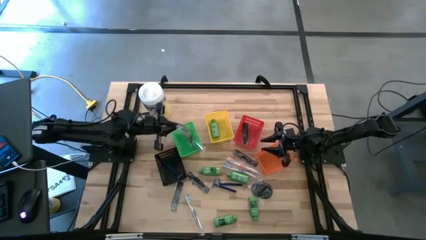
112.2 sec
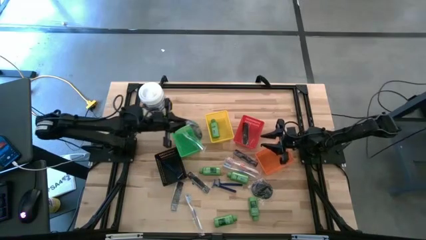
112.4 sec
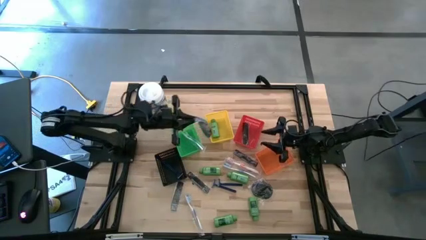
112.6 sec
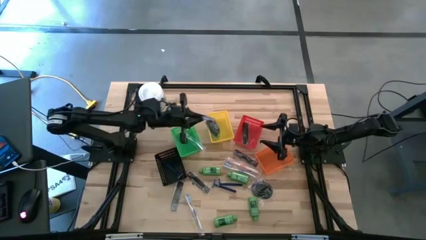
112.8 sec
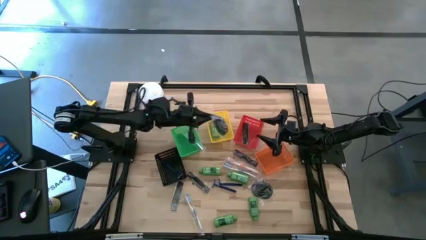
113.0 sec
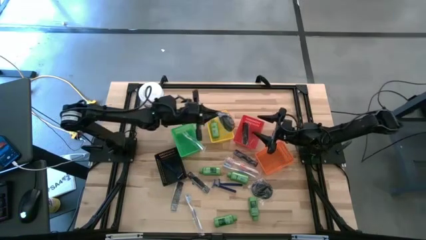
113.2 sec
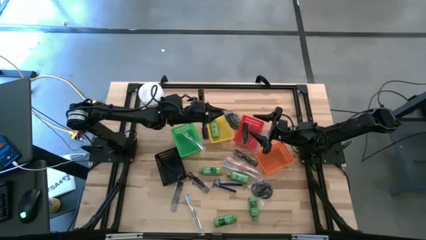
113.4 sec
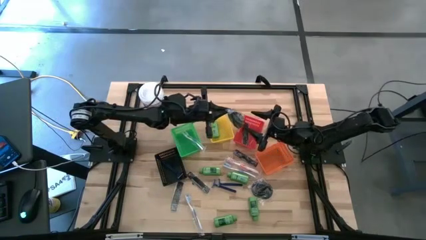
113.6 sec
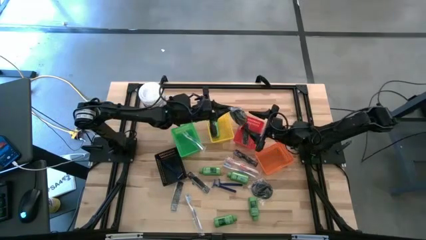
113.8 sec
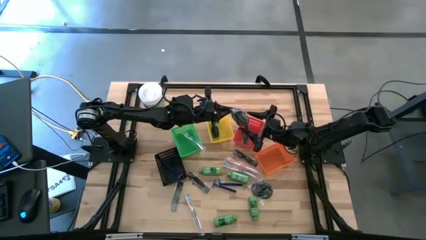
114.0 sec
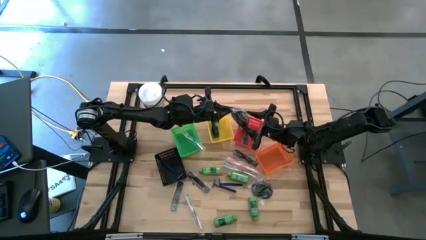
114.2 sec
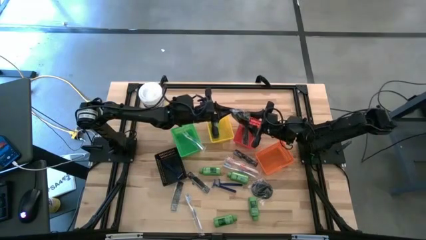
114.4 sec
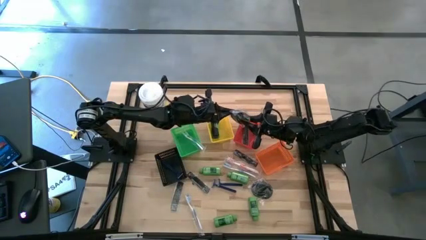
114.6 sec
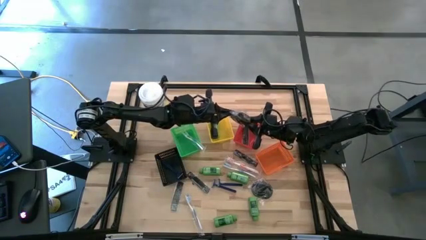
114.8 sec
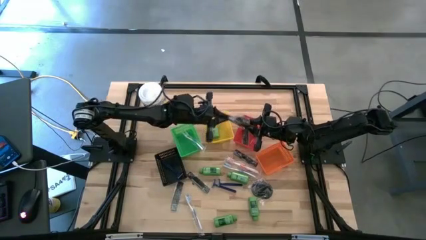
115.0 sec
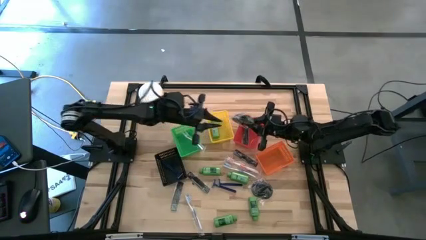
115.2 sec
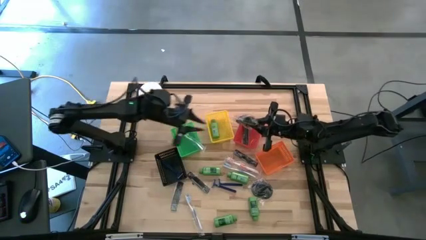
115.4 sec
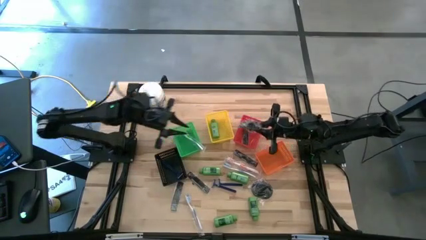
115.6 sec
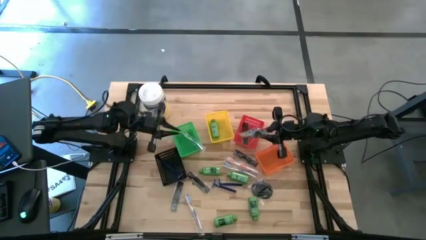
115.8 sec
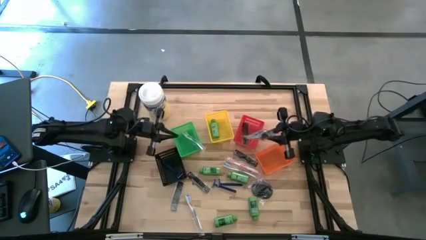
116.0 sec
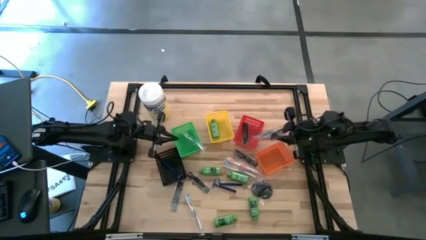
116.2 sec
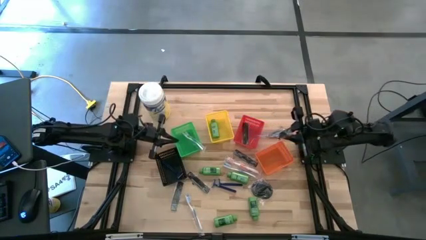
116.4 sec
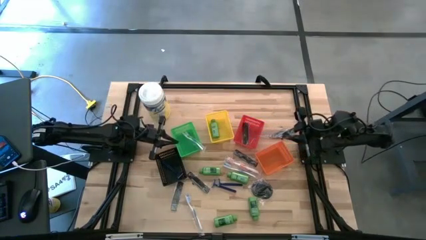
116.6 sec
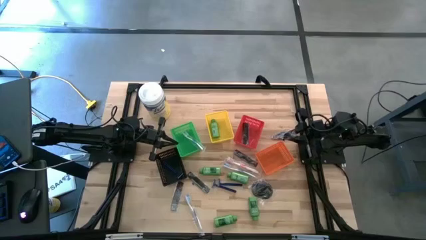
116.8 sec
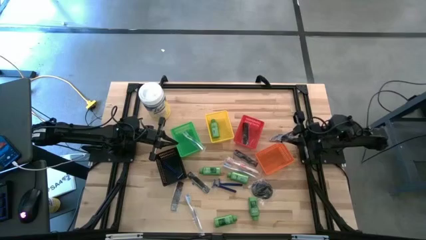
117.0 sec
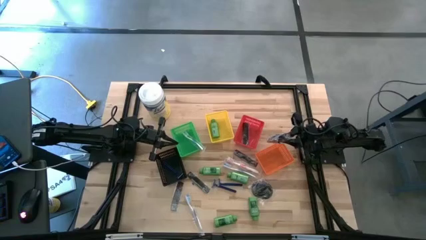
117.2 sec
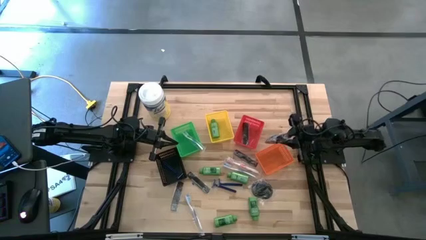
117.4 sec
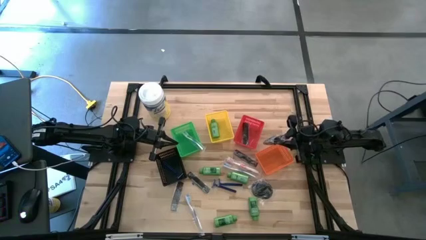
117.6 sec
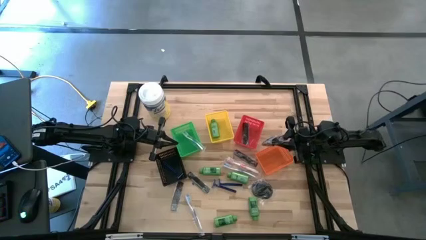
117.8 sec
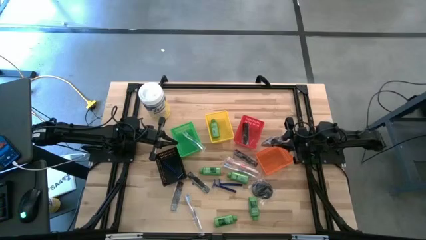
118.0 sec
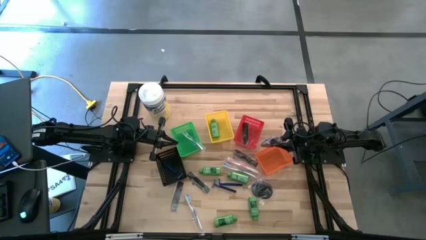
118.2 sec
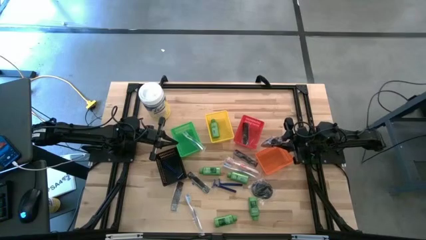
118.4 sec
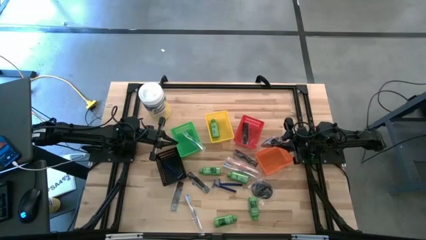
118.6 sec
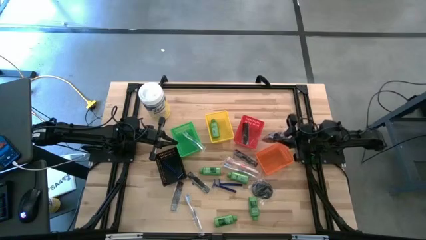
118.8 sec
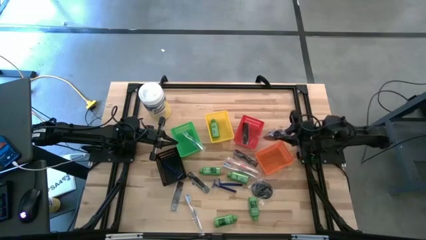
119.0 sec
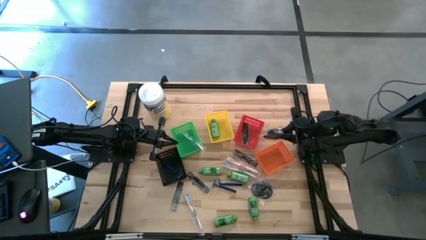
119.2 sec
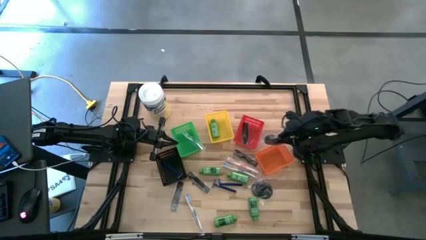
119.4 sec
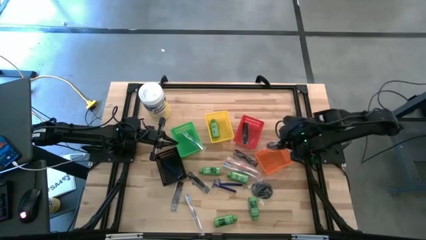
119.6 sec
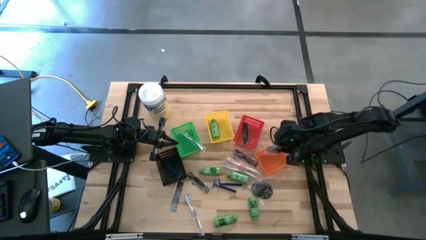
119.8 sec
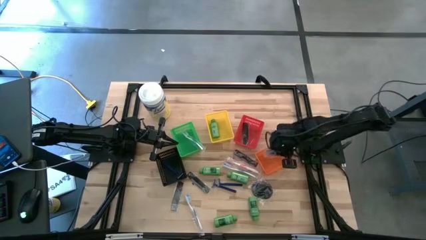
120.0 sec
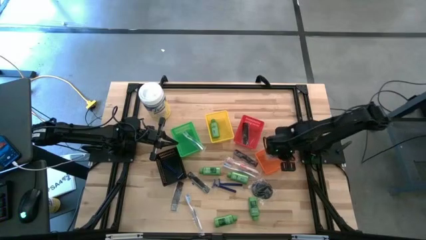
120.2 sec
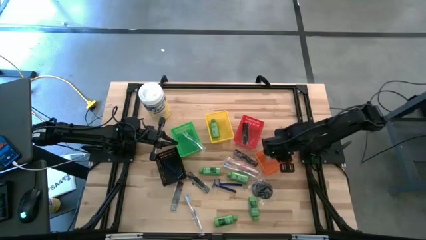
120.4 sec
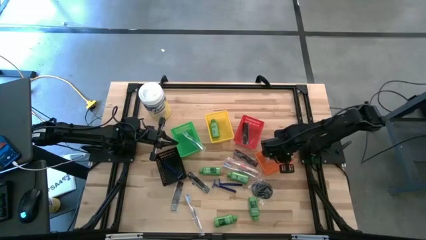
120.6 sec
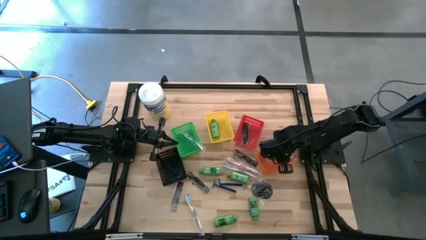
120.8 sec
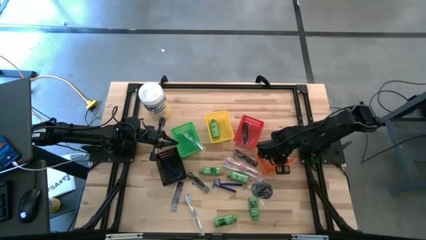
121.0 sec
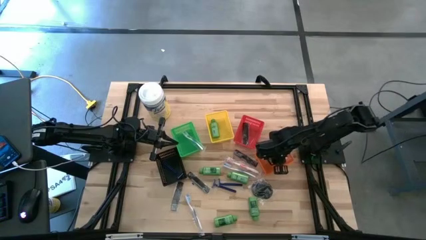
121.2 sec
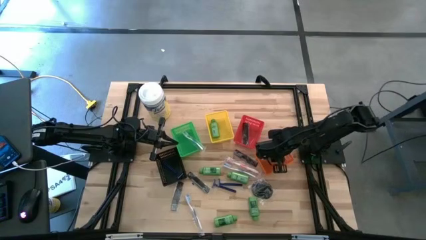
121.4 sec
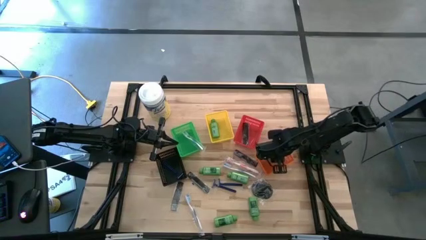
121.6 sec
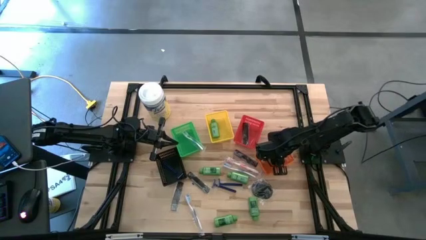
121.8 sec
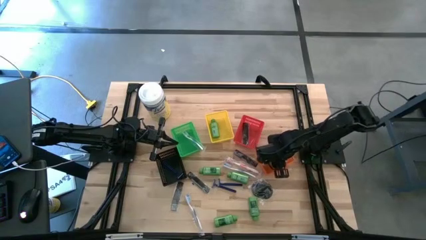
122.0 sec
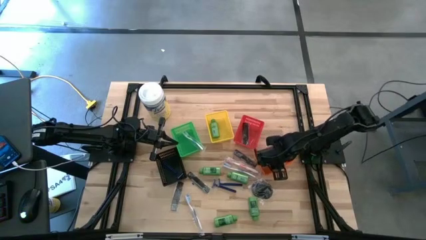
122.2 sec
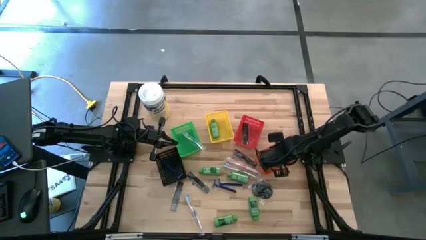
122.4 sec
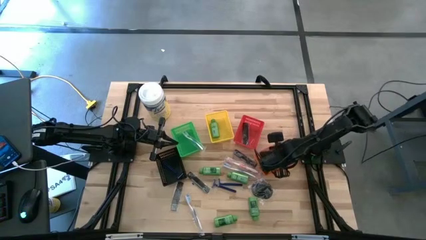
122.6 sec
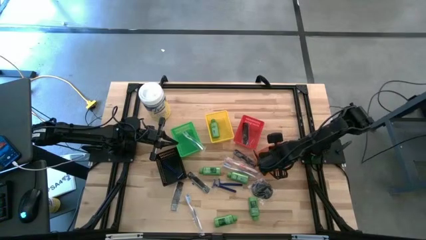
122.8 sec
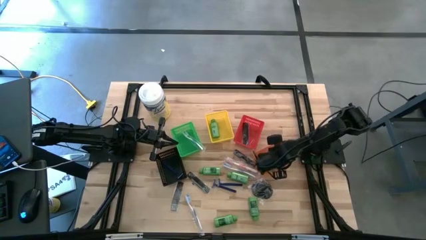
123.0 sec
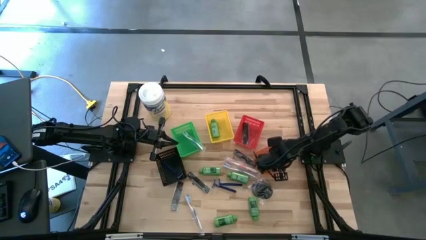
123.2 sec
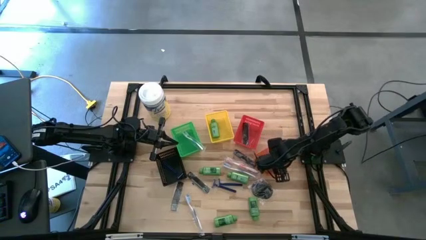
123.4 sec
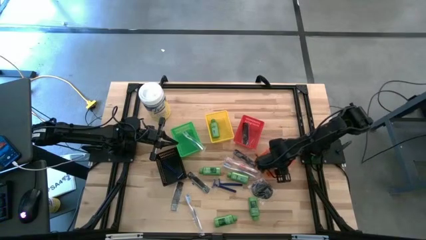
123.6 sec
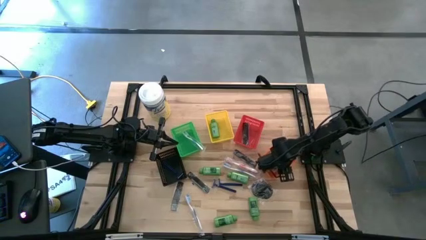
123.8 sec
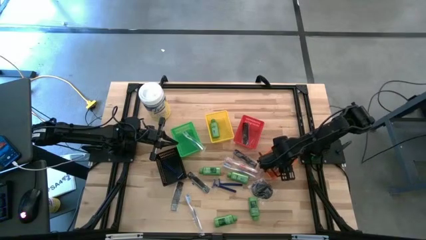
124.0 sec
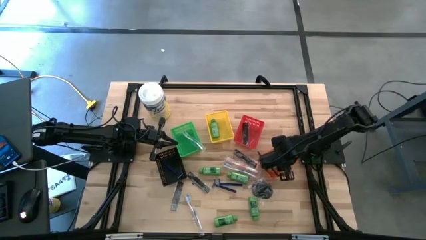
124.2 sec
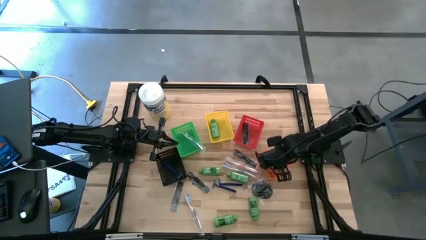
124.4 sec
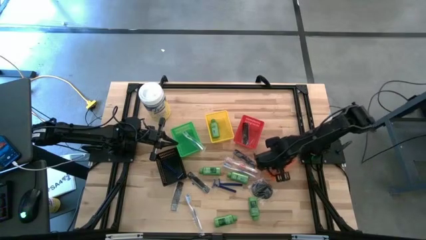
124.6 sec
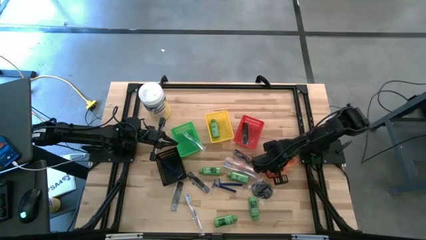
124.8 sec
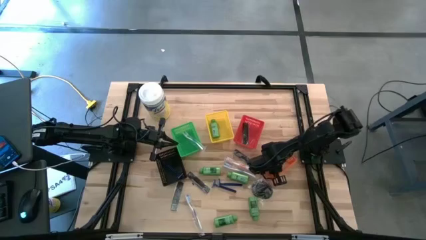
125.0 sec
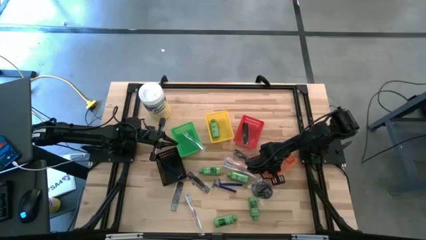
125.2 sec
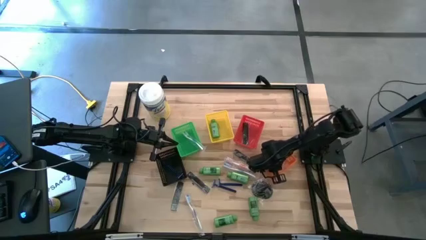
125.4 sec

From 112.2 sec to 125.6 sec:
Task: Pick & Place Travel size toiletries
Put the black hairbrush into the orange bin
